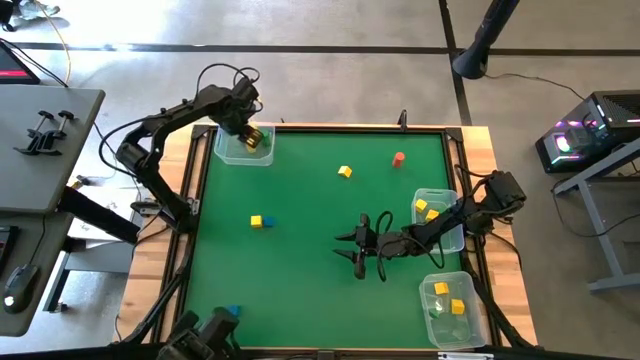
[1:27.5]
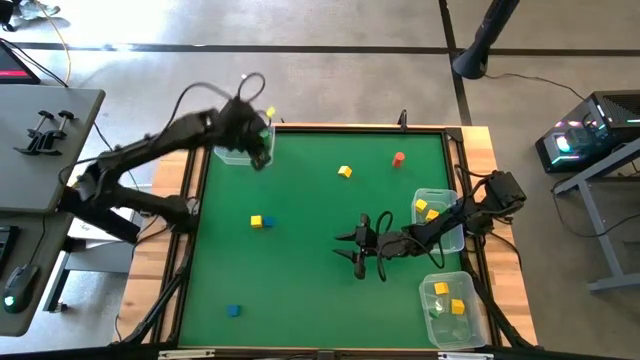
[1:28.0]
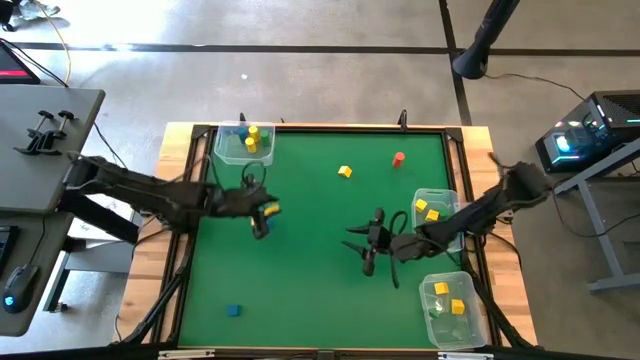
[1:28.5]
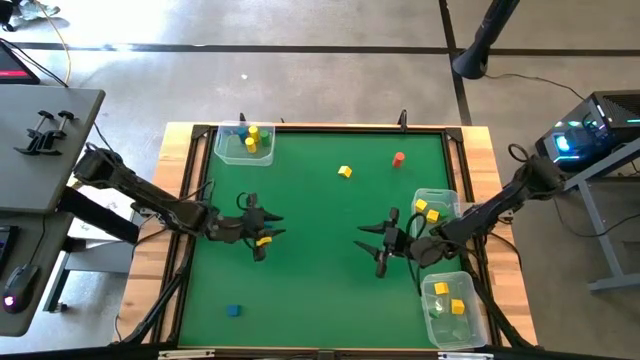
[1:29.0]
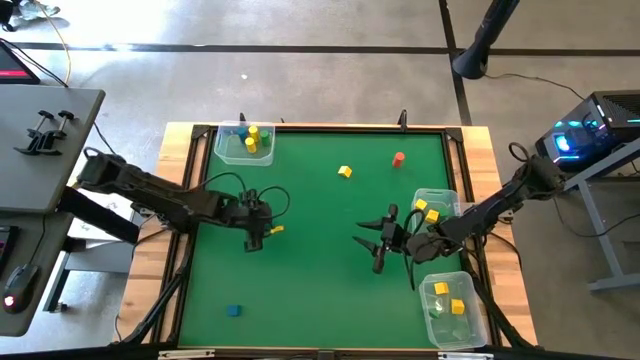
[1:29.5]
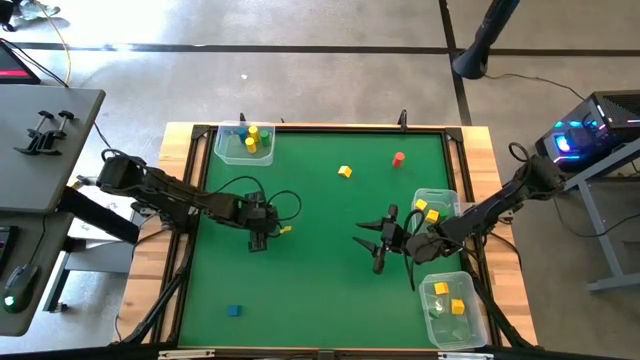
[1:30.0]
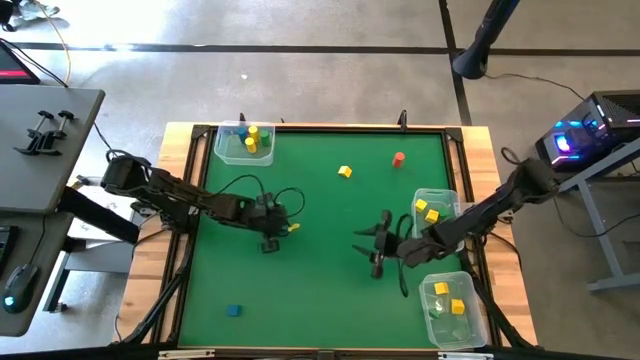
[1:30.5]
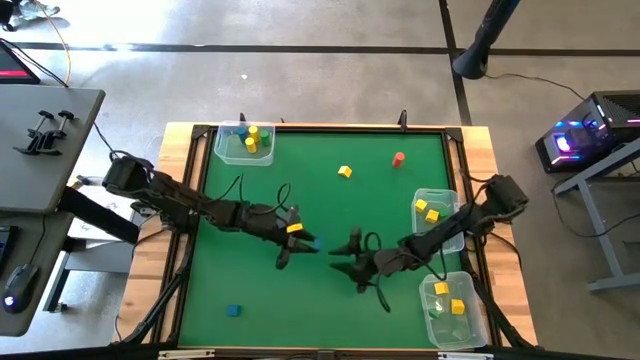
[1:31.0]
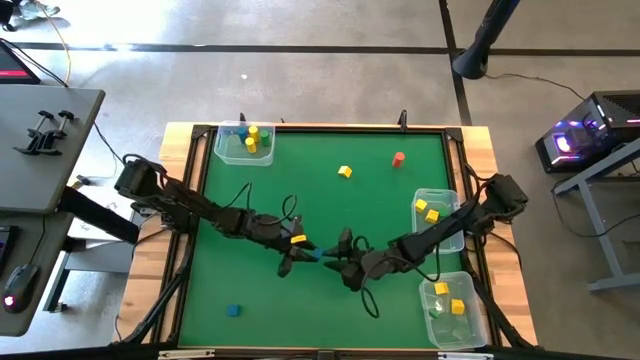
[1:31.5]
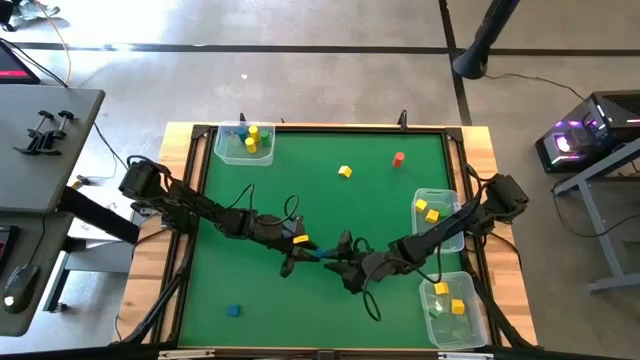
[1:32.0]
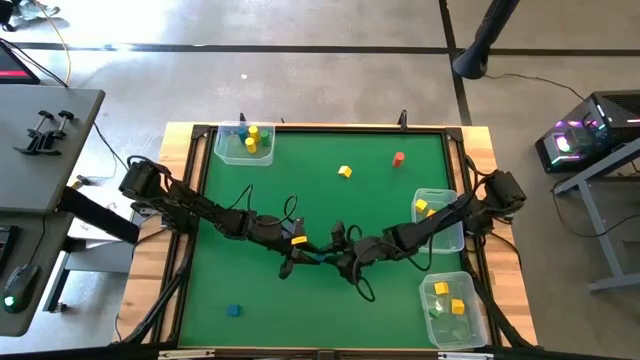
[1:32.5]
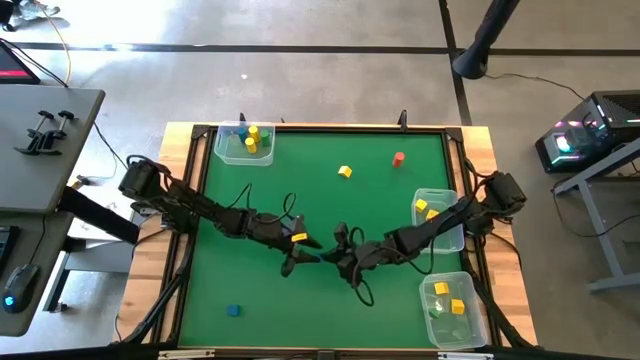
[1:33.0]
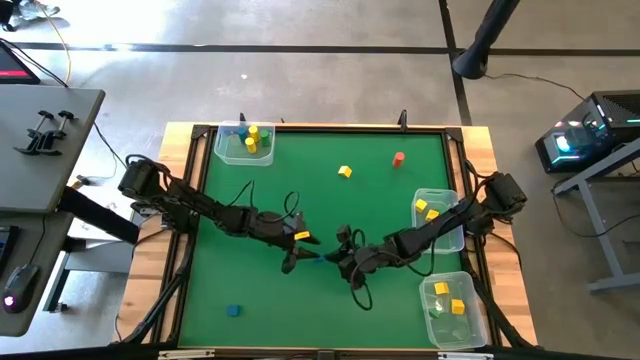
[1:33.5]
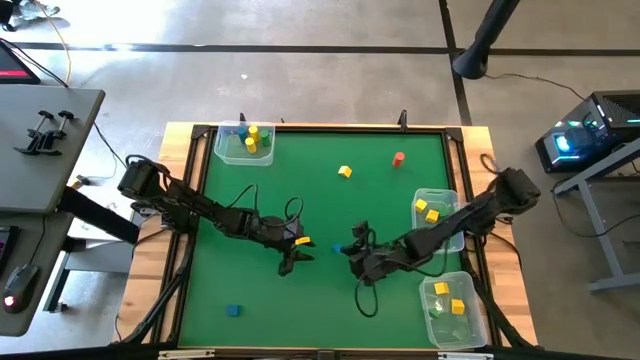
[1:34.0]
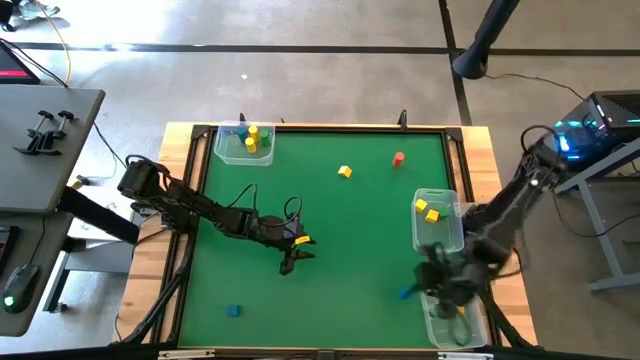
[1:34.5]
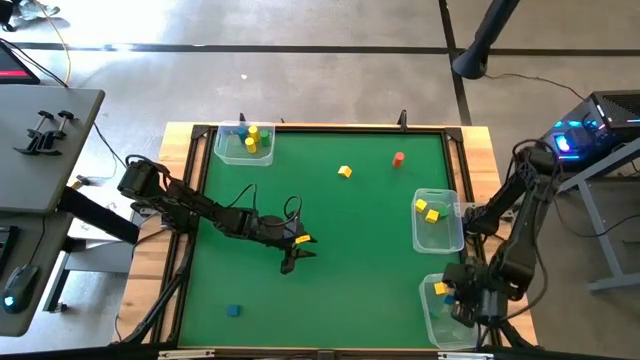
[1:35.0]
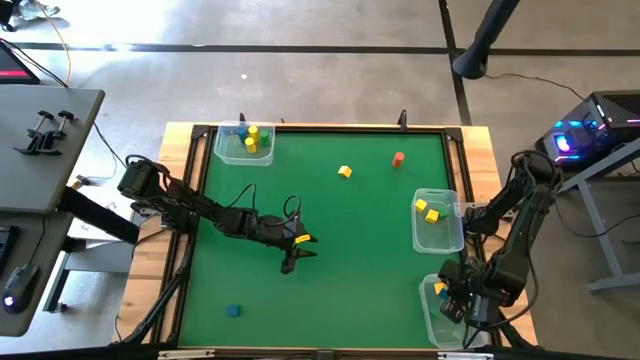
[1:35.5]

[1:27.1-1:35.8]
Task: Sort blocks by size
Put the blue triangular block into the bottom transparent bin

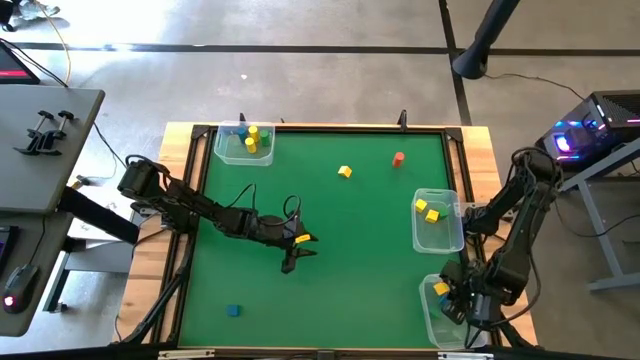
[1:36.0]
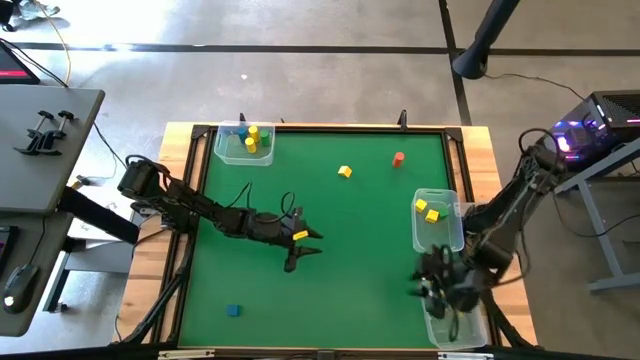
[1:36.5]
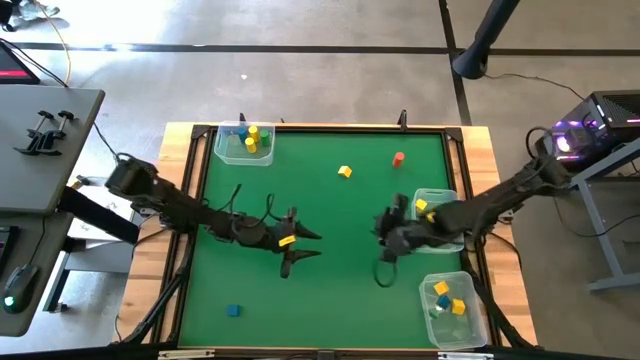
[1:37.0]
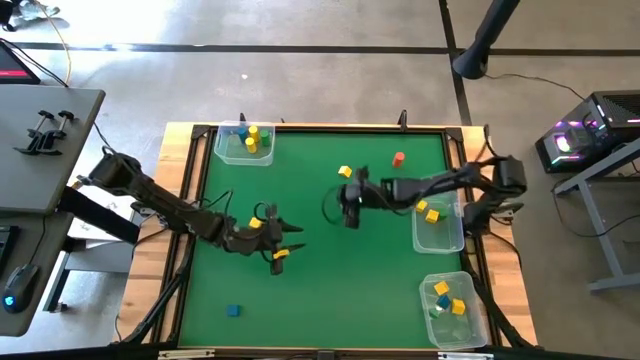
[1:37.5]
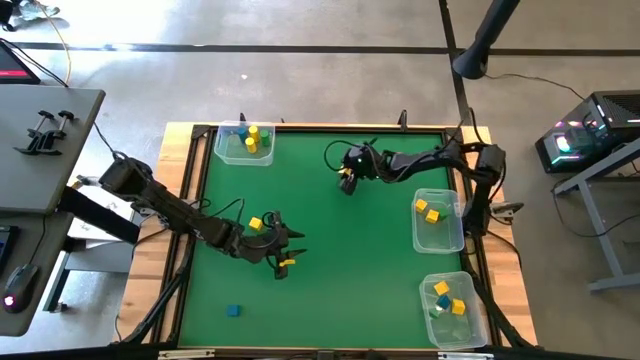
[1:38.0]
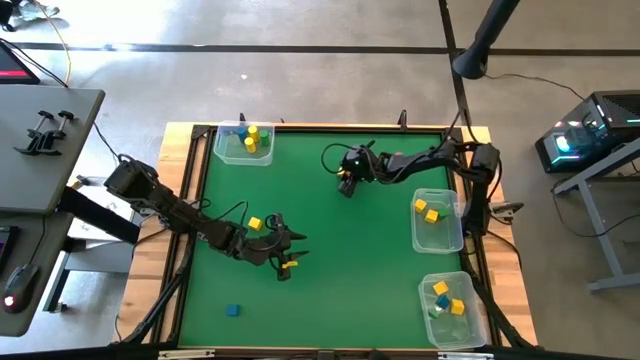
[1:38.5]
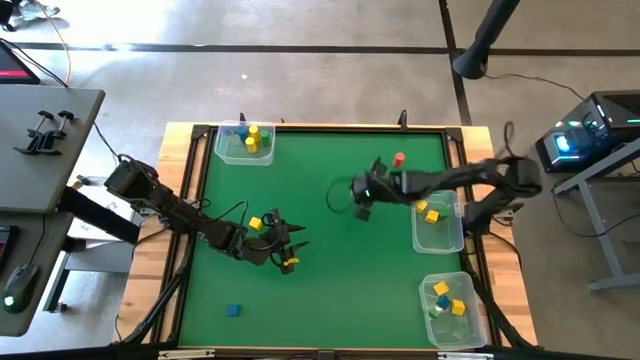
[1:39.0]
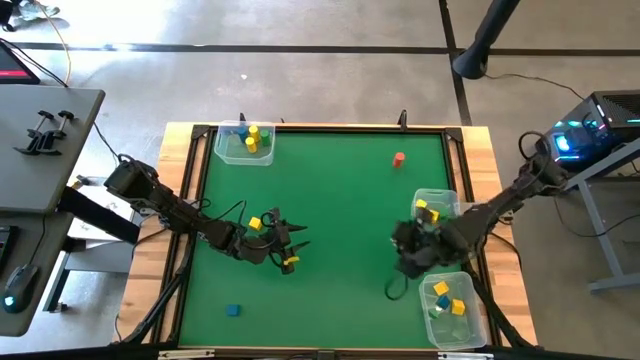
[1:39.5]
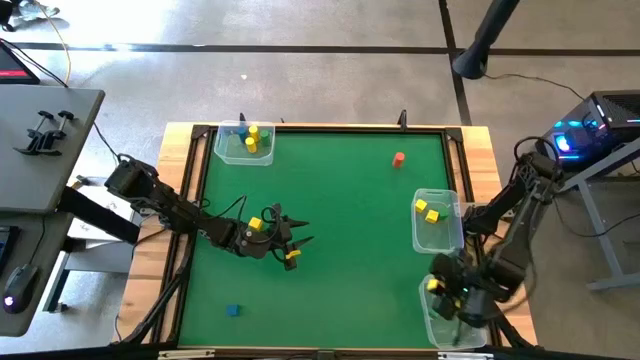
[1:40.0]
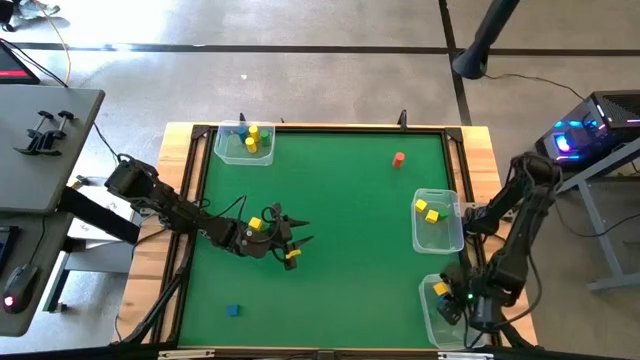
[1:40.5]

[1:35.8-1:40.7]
Put the yellow triangular block into the bottom transparent bin

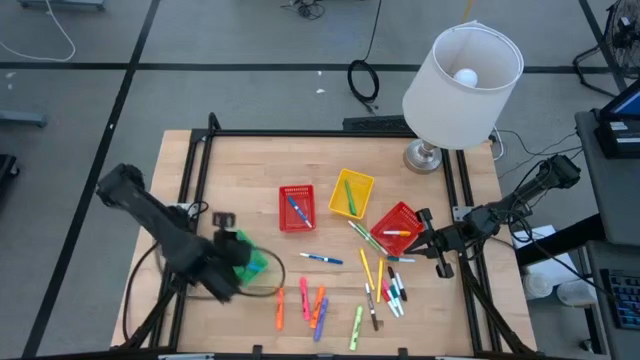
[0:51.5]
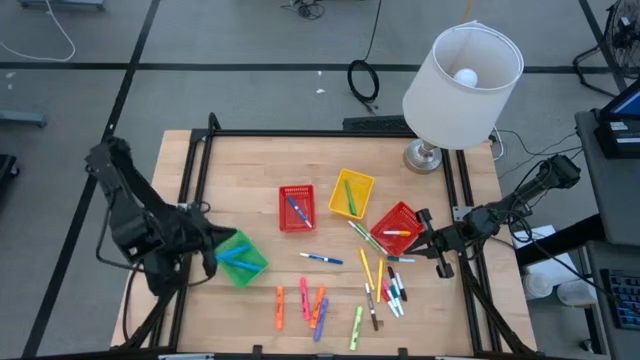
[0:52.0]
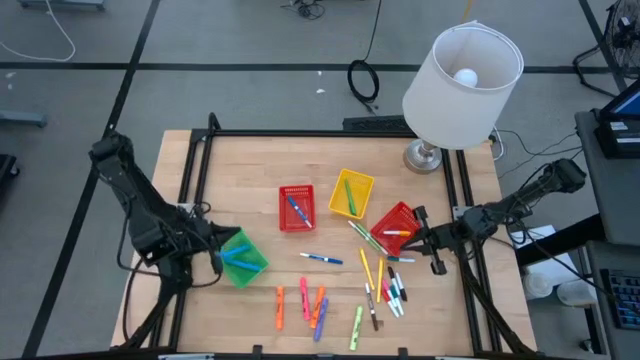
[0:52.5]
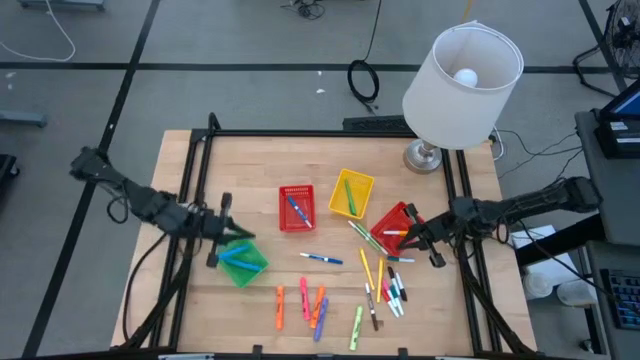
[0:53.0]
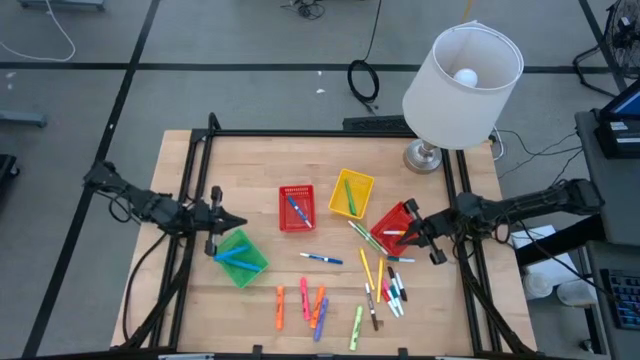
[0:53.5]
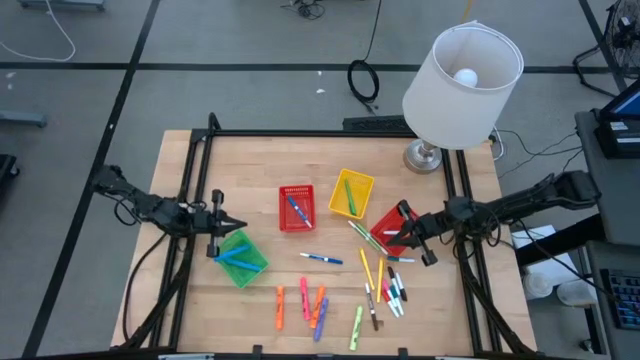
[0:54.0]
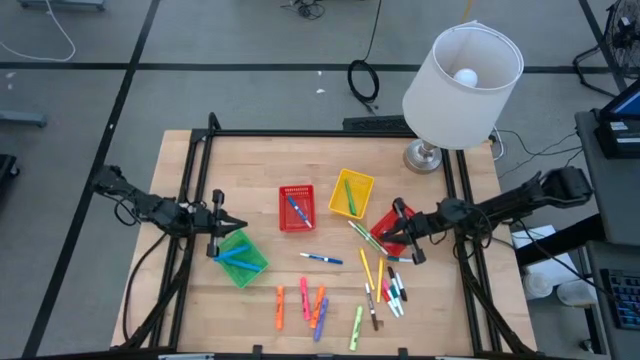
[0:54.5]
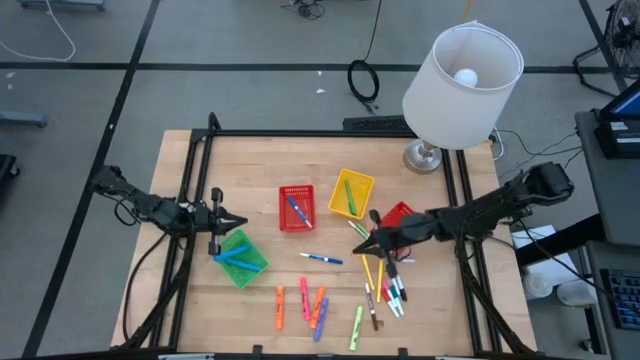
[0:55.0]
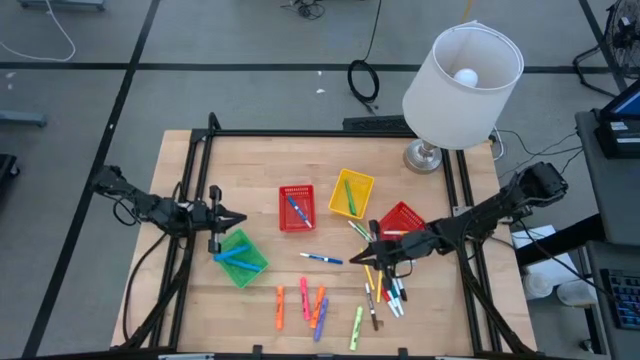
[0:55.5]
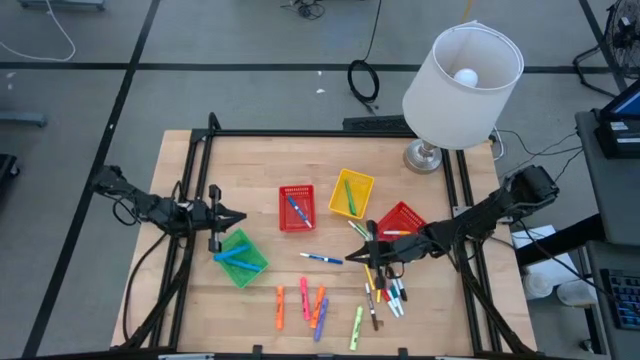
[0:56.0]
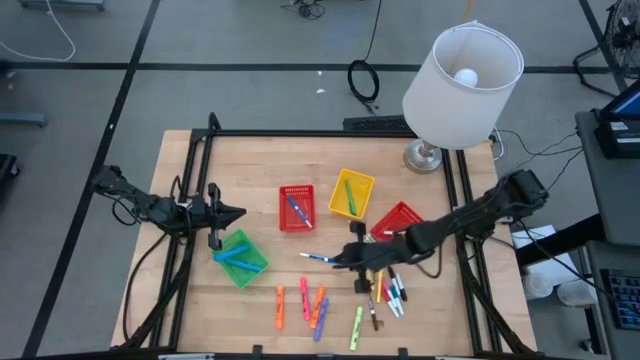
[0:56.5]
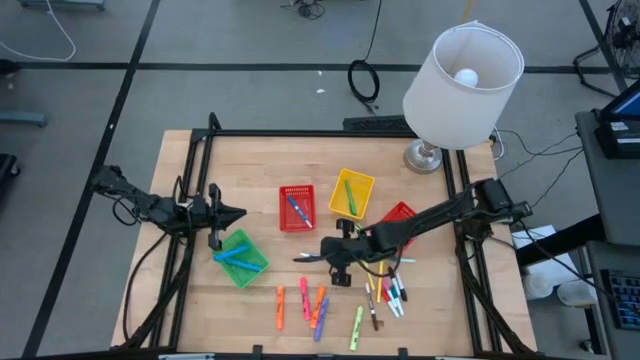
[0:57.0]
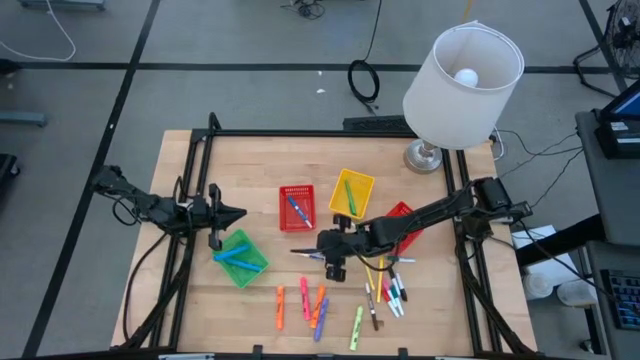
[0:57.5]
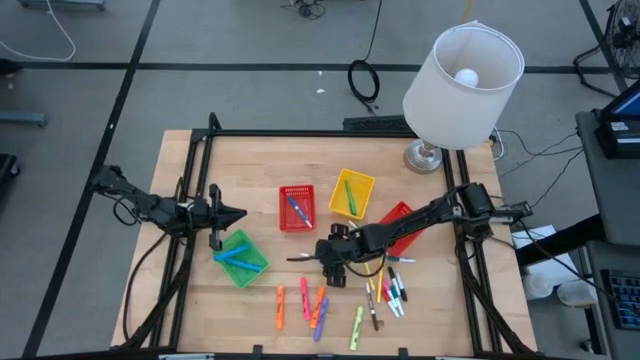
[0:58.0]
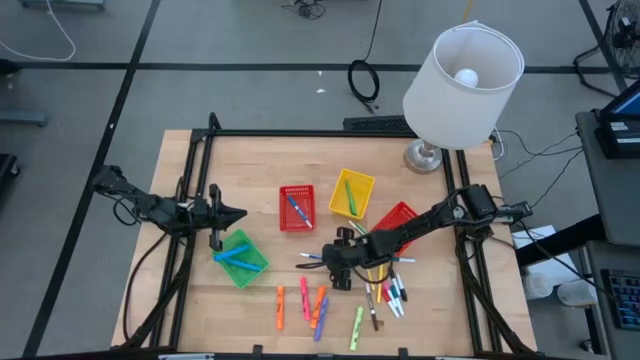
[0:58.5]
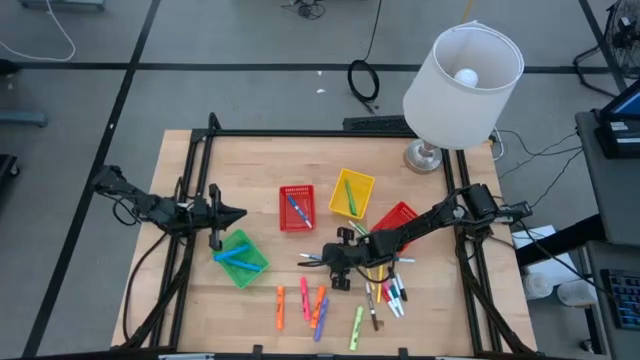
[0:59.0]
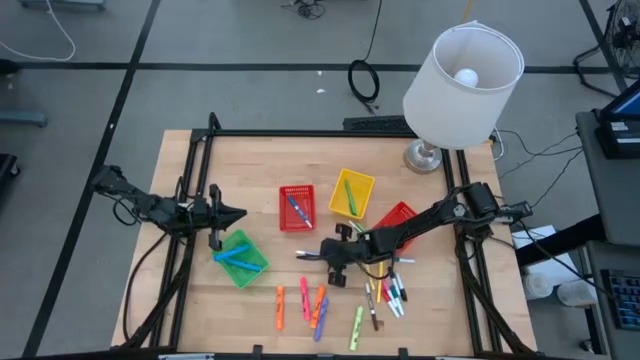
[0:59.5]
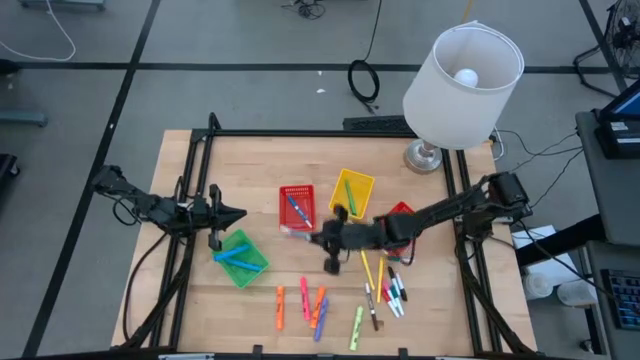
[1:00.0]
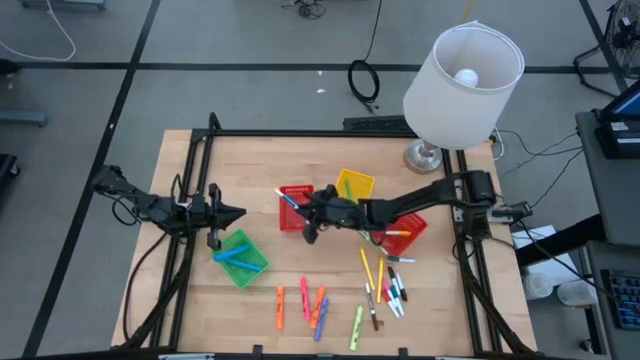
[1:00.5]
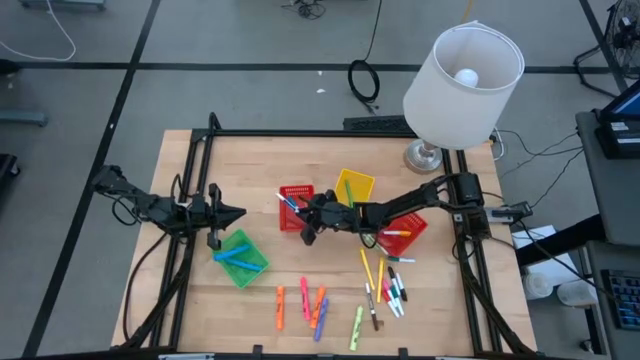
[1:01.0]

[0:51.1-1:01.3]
Task: Pick & Place Markers
Put the purple marker pen into the left red bin
